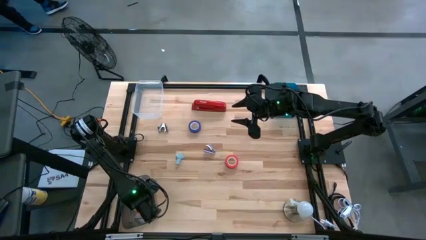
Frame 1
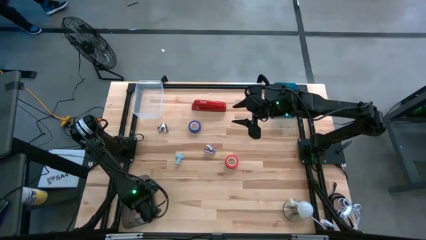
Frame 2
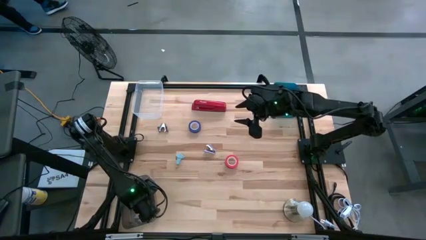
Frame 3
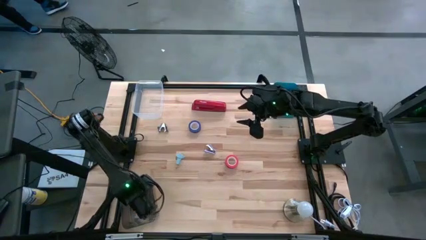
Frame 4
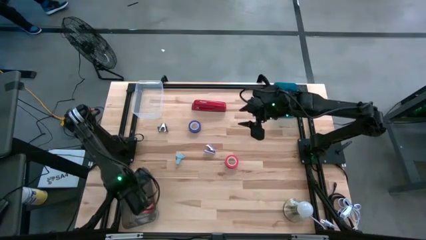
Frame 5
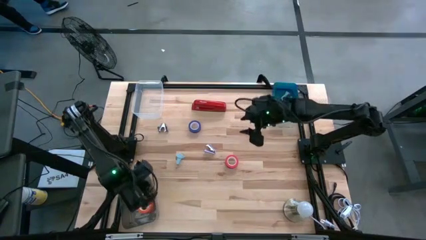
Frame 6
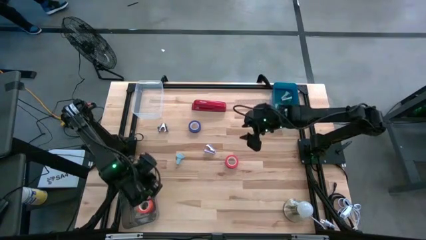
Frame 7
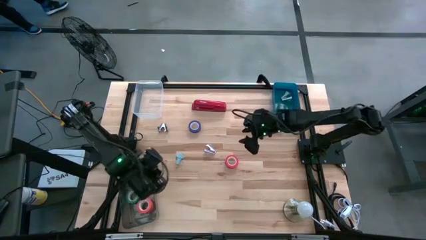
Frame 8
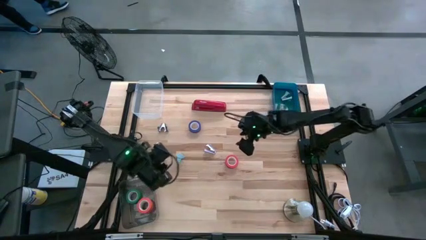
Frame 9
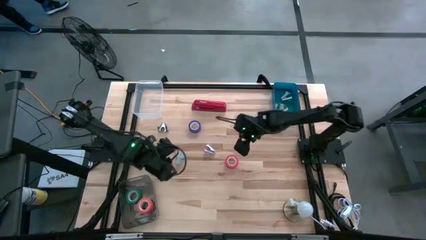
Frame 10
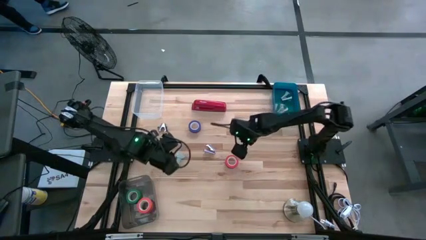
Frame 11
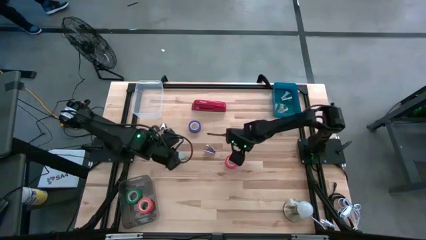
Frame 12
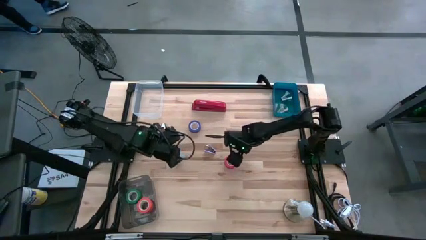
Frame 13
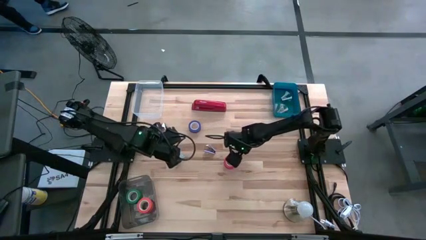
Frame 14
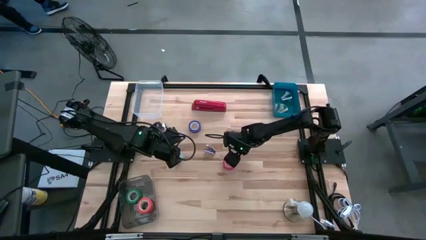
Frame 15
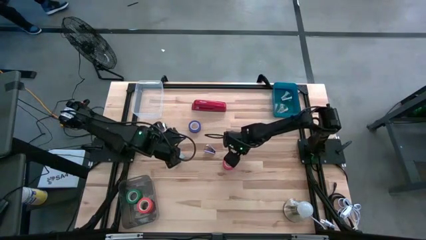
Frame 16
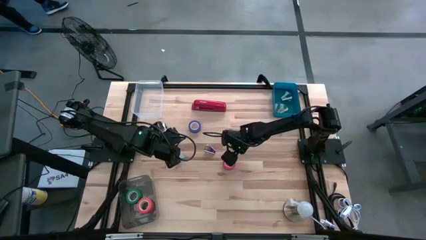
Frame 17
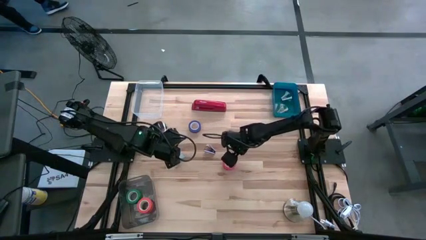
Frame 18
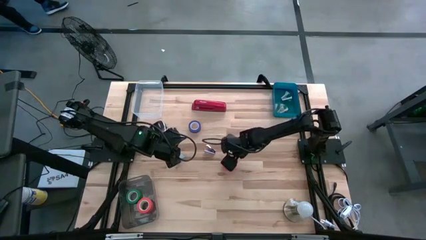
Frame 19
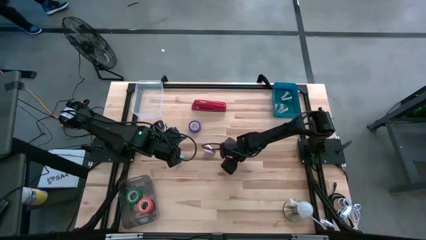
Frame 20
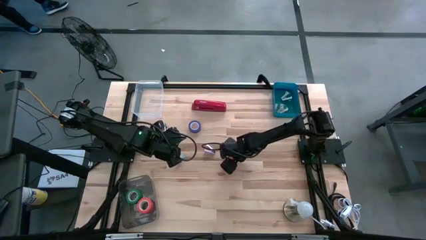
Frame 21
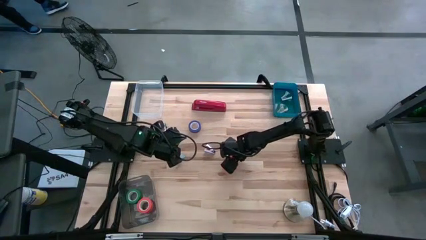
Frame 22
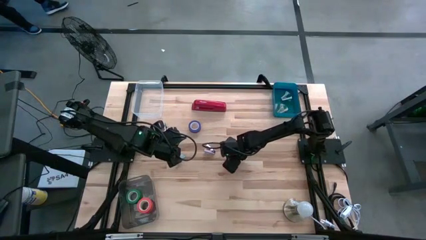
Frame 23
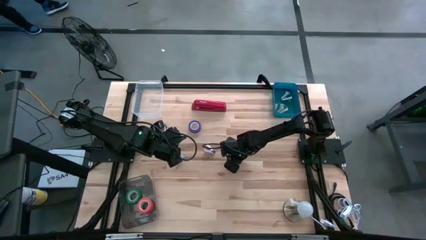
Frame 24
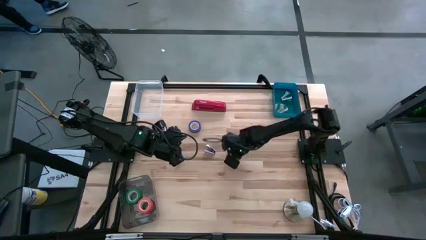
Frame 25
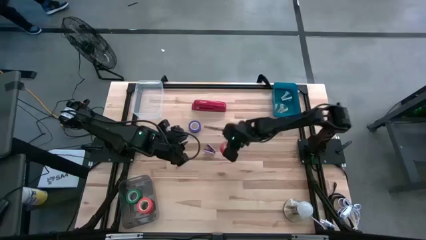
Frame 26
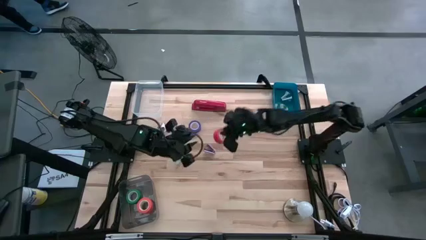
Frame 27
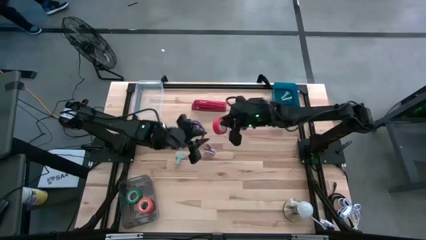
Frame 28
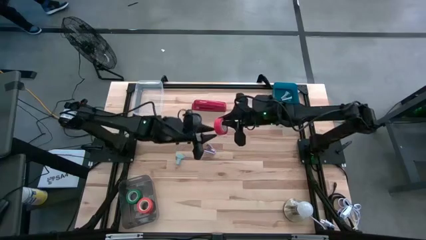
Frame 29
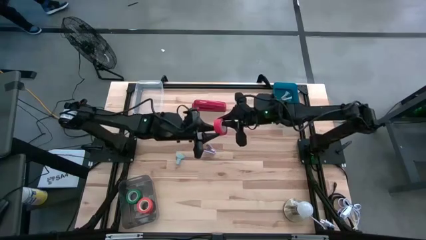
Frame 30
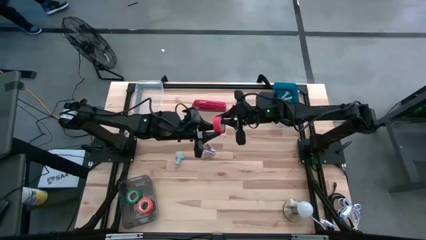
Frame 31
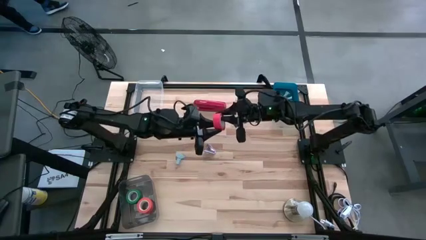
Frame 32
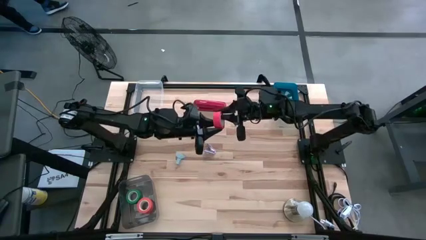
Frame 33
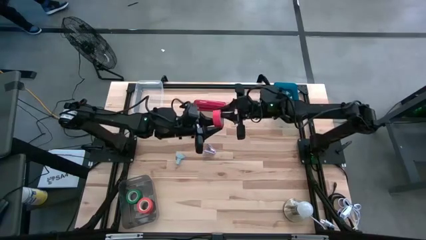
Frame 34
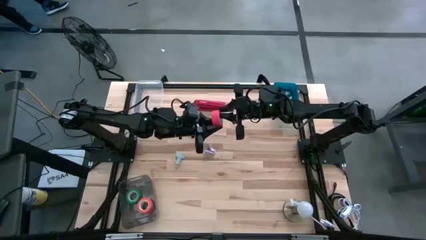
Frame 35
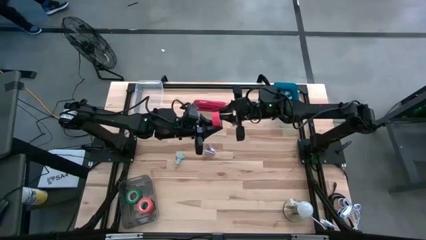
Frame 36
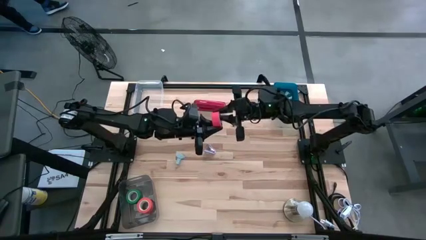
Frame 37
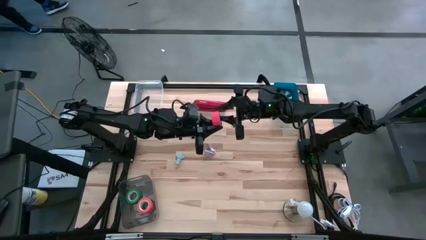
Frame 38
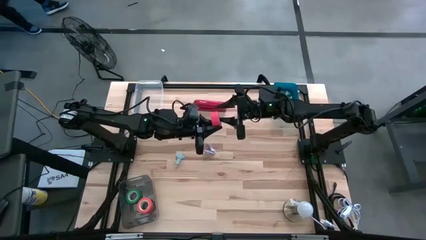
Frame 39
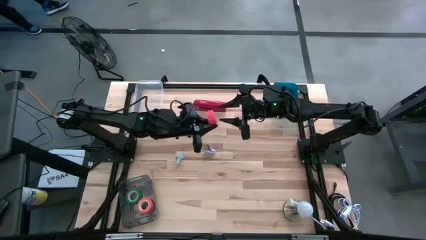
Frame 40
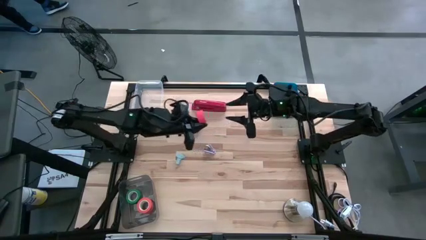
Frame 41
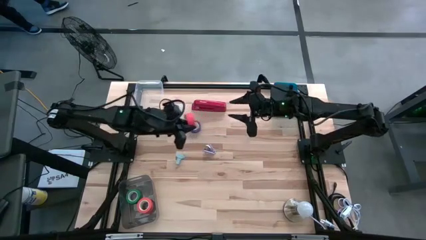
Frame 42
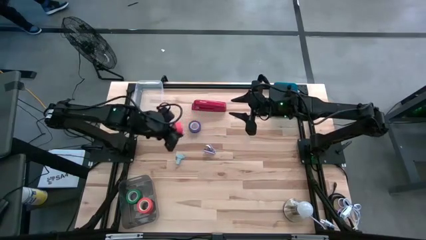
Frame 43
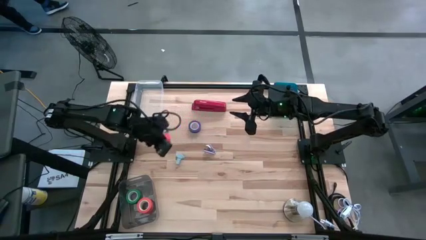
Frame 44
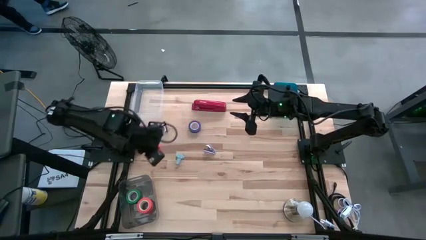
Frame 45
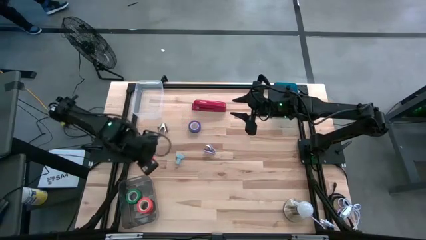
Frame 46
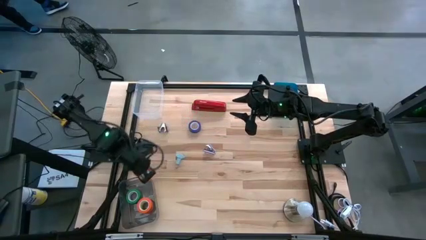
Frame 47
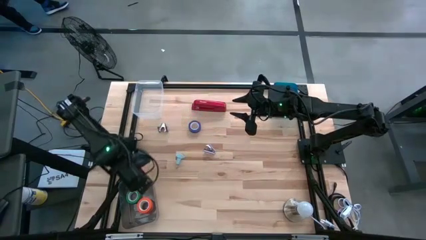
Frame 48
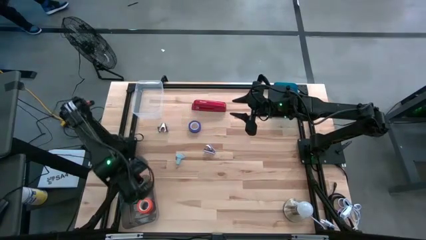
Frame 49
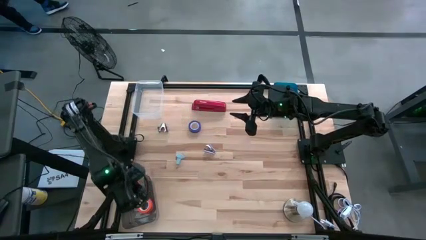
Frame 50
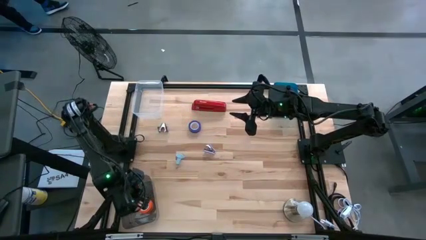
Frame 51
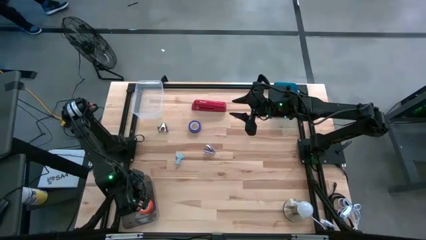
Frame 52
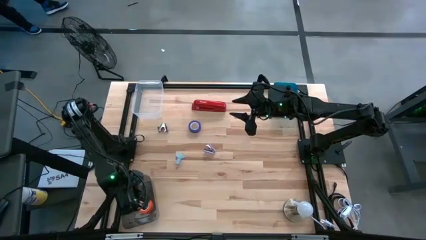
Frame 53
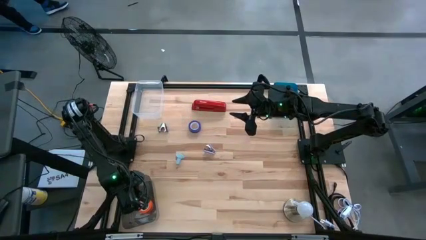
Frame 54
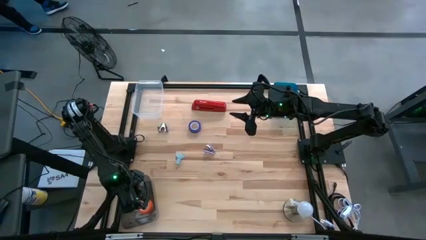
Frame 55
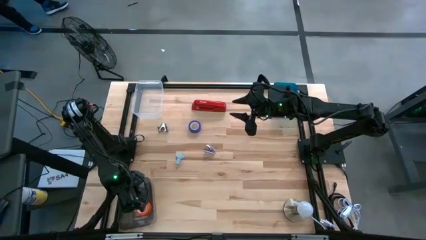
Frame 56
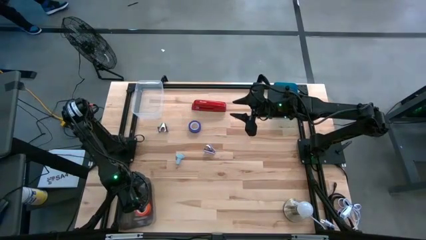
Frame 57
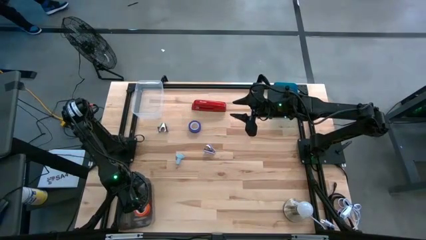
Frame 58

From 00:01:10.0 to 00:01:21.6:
Task: Pick and place Stapler, Stapler remover, tape
Put the red tape into the black bin
